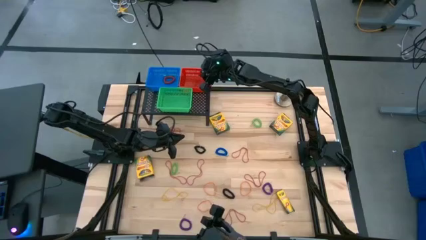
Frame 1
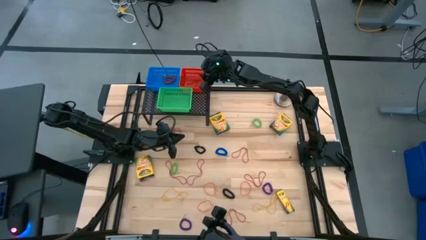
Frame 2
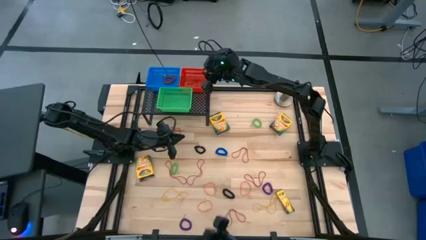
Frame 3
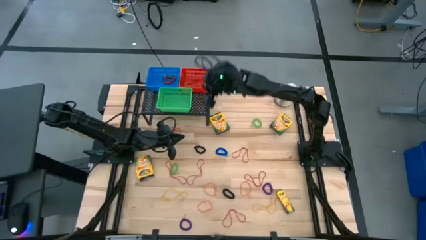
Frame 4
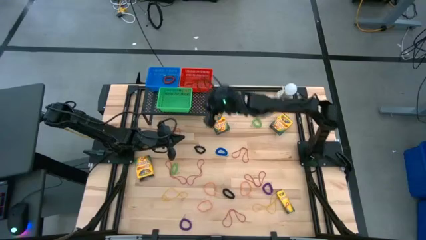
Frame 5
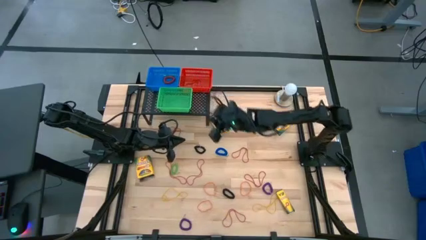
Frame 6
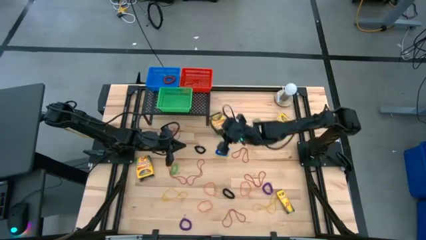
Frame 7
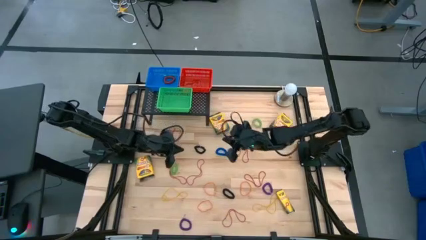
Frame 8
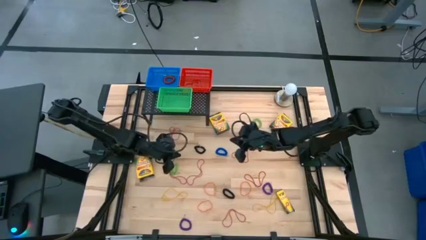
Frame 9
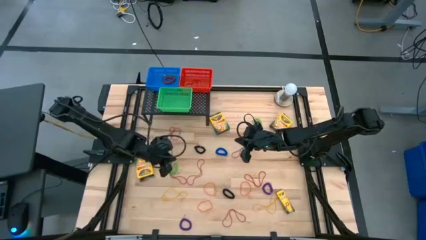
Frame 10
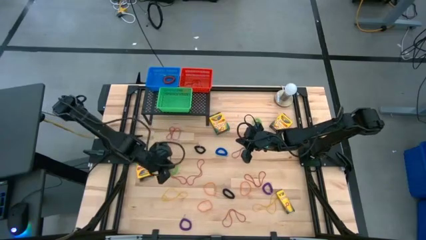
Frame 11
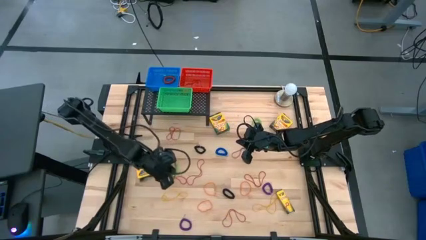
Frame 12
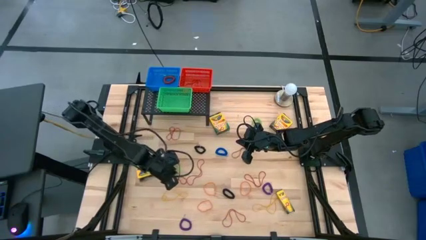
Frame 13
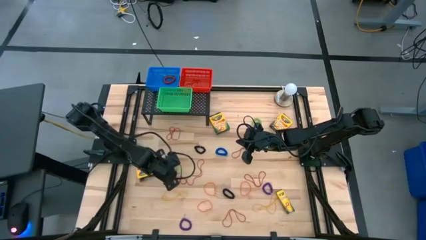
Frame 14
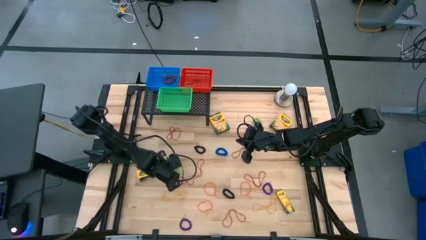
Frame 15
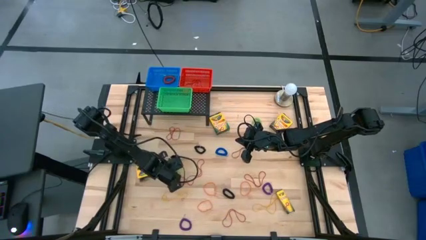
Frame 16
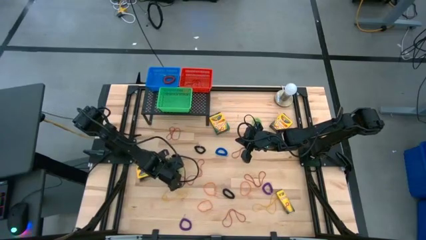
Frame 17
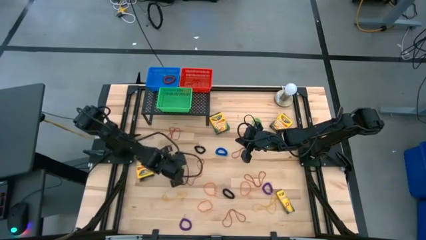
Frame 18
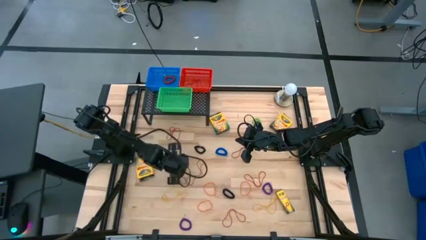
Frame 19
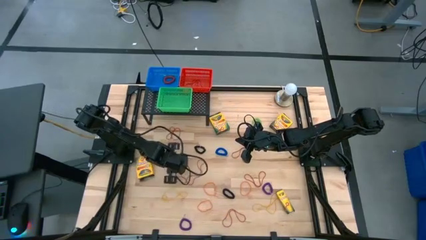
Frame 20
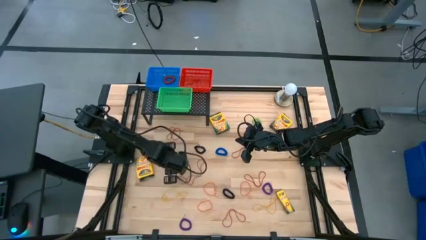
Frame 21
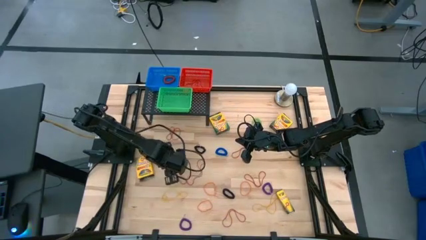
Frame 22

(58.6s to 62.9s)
Task: Pick & Place Office Desk Supplies
Put the green spring keychain into the blue bin

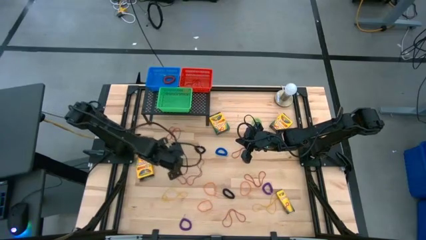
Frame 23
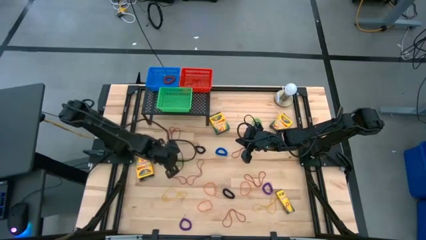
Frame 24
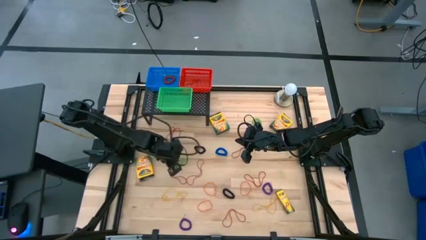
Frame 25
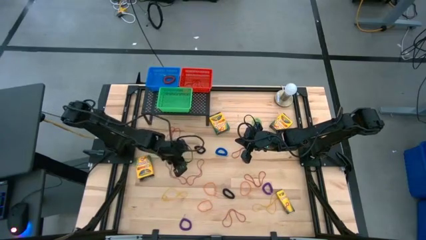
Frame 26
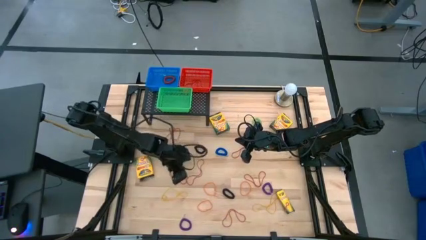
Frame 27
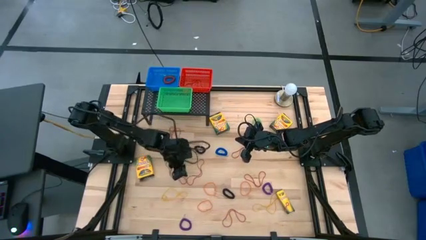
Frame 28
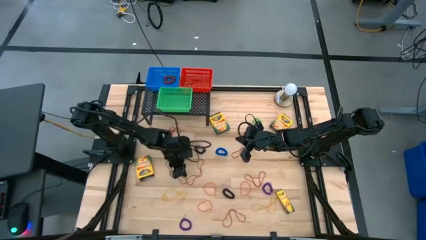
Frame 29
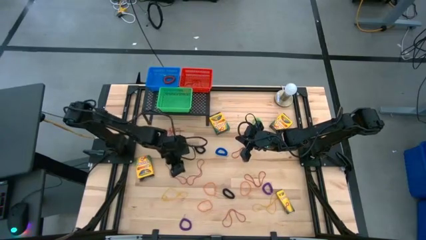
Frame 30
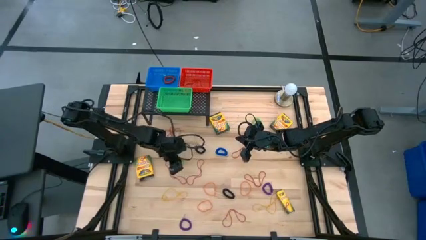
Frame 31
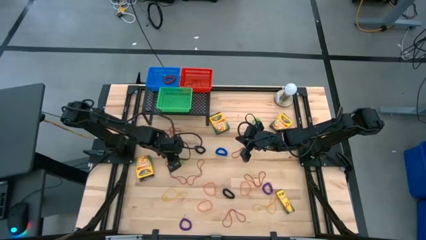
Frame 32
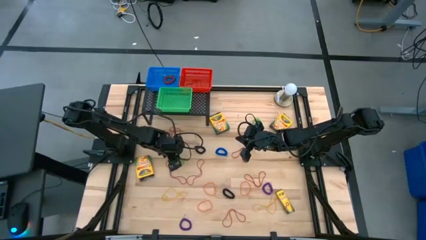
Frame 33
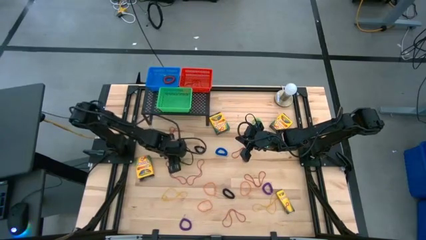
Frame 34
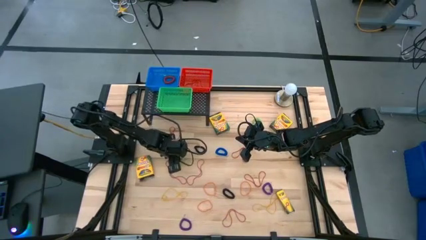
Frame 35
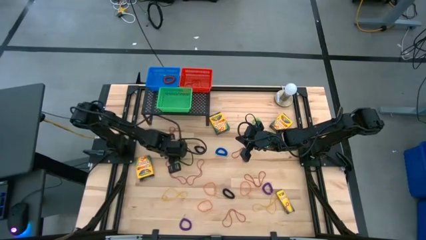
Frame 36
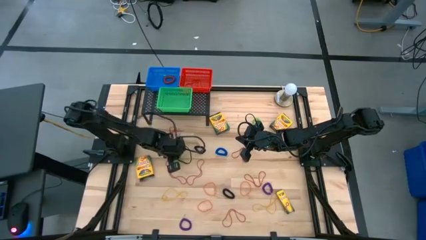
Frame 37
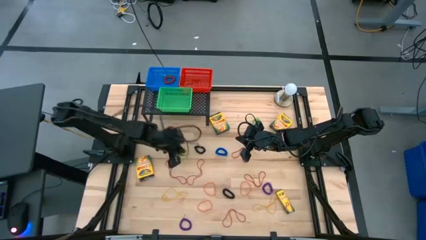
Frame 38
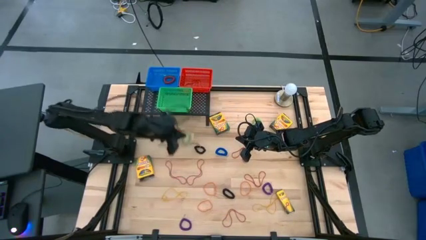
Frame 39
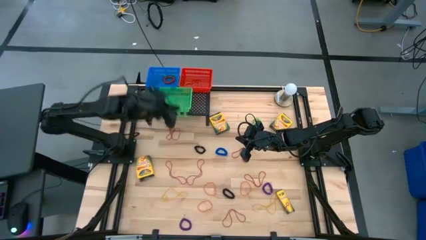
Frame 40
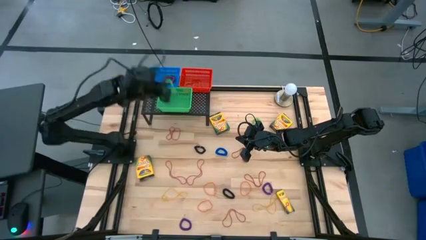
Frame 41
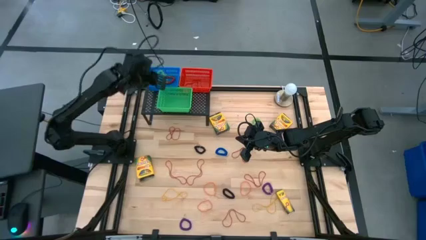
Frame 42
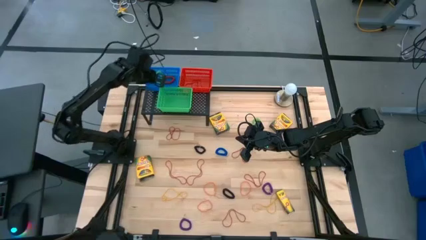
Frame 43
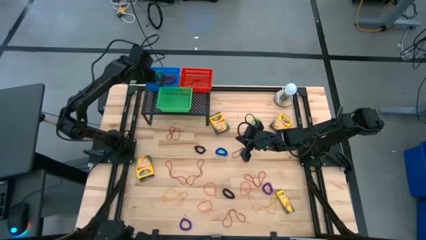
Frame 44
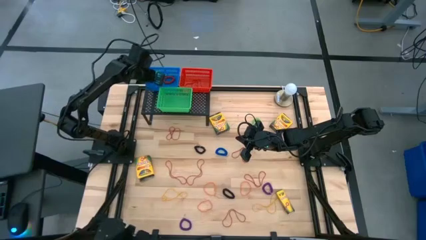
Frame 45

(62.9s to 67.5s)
Put the green spring keychain into the blue bin

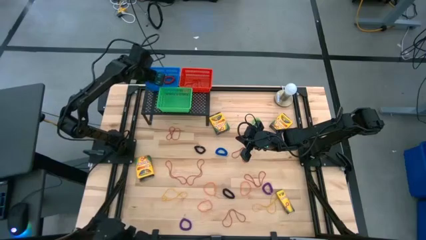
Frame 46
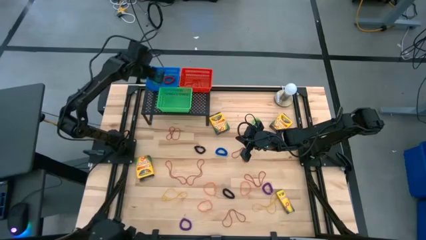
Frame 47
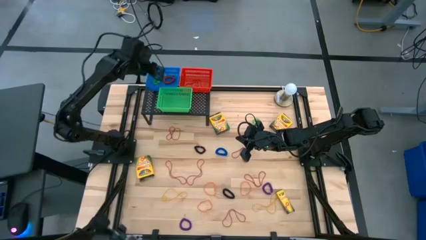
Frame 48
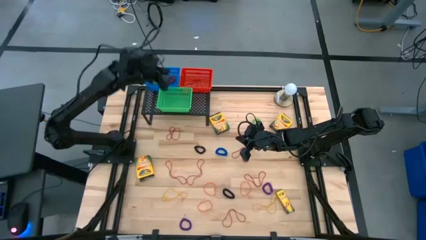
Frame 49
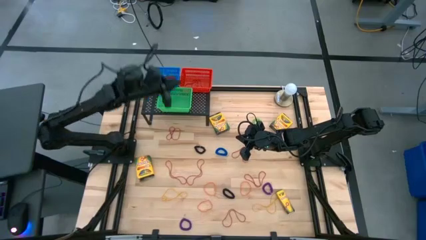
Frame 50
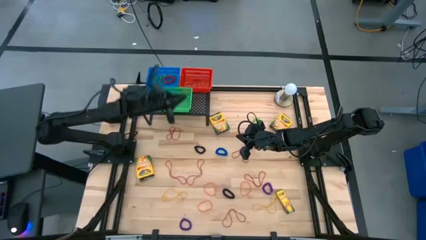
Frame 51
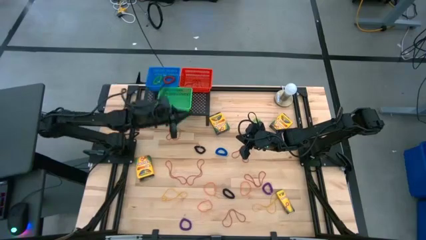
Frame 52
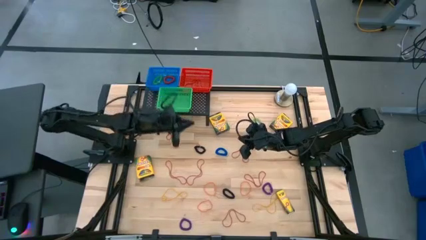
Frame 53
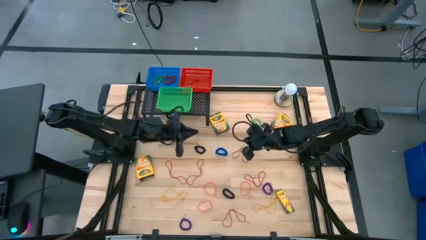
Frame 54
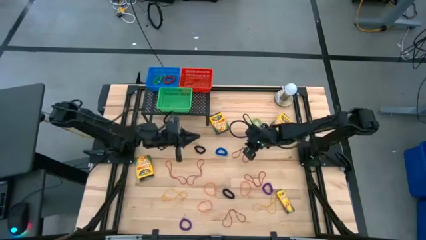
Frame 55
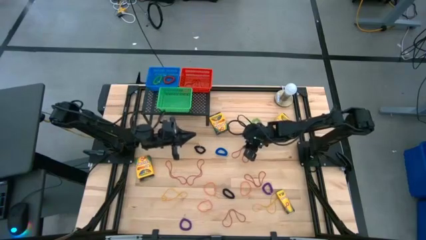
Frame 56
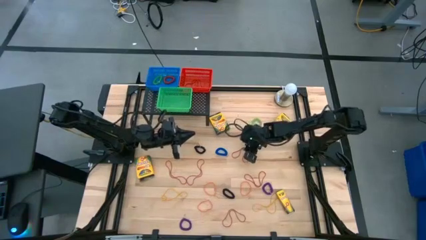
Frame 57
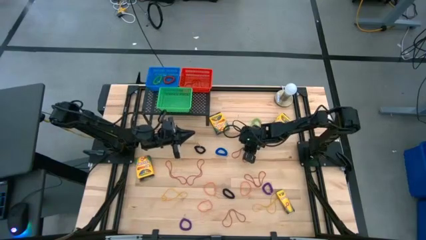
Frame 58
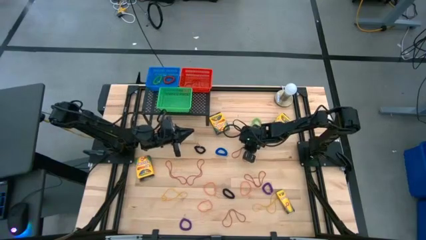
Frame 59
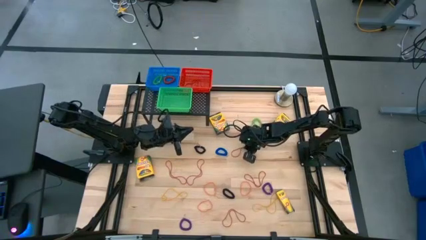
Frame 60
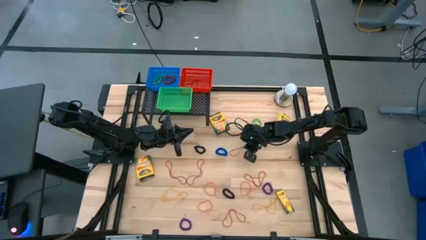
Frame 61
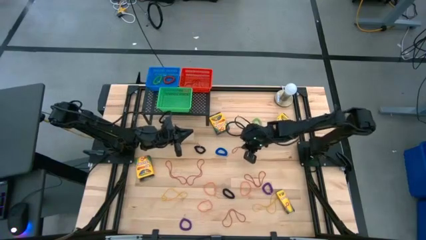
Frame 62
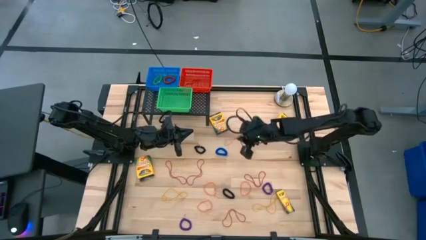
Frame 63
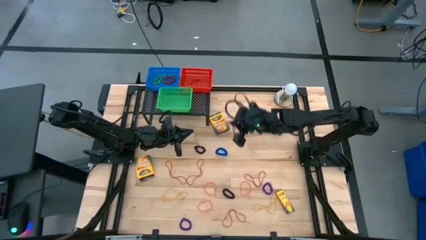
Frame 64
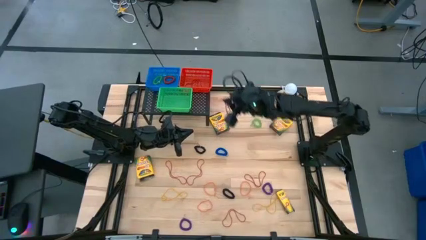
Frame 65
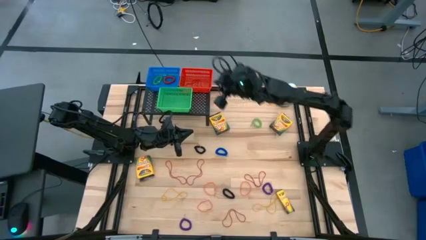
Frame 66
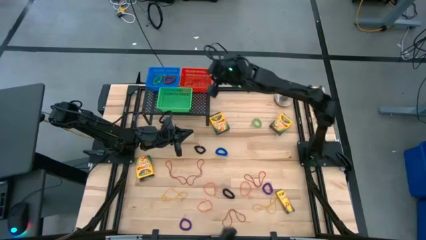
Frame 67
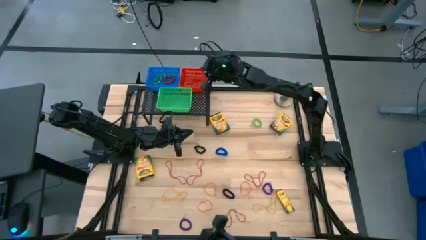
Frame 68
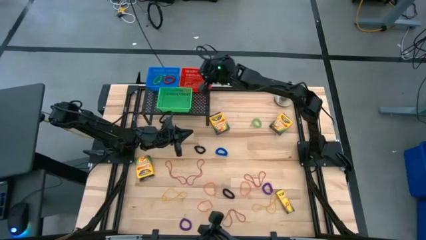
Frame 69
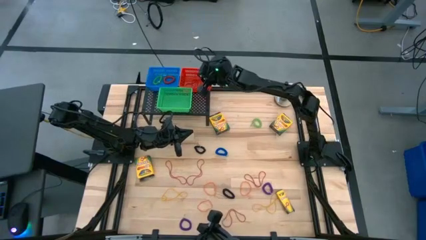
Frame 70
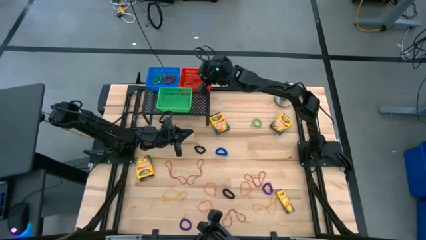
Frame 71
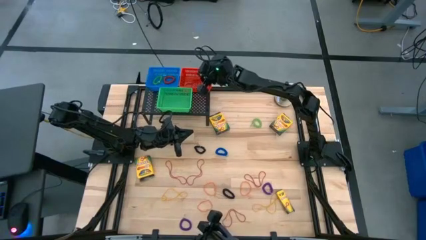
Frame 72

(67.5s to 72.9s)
Put the red rubber band into the red bin
